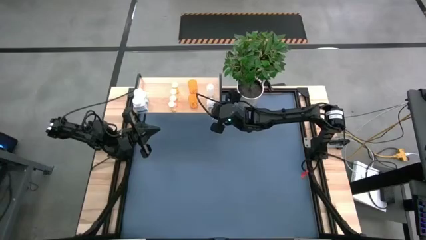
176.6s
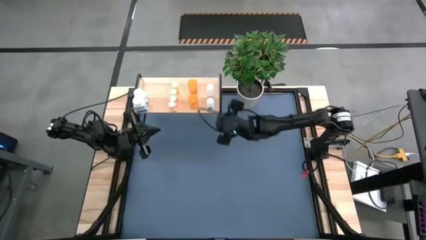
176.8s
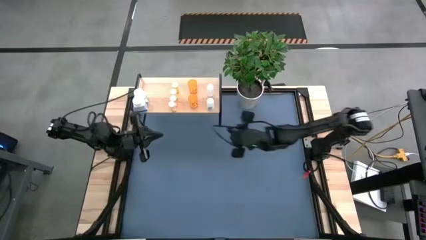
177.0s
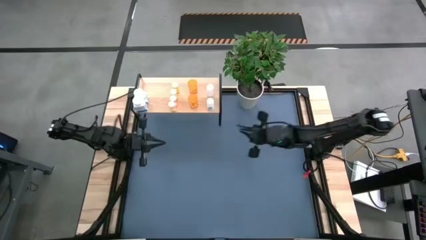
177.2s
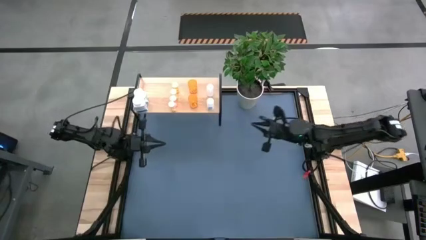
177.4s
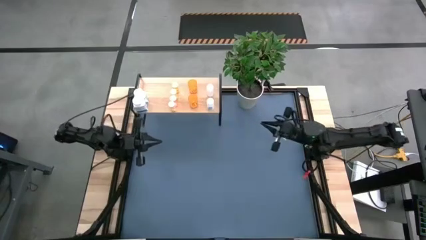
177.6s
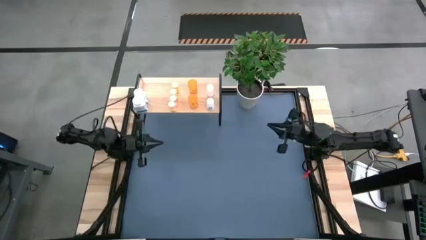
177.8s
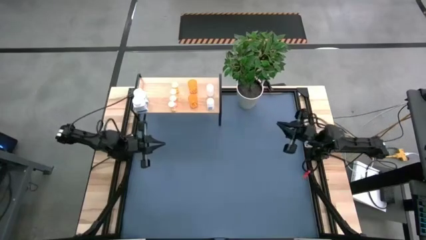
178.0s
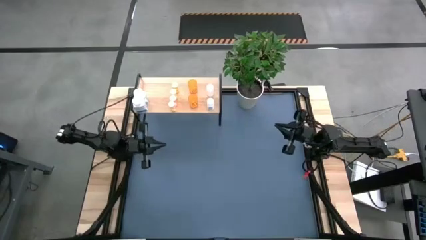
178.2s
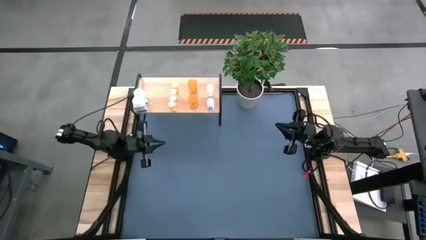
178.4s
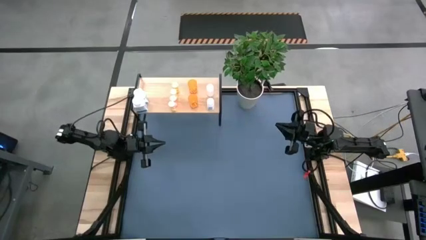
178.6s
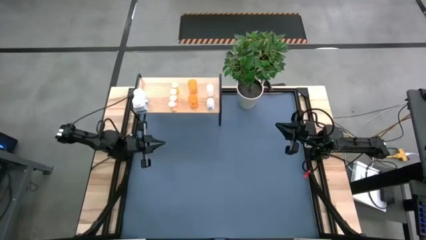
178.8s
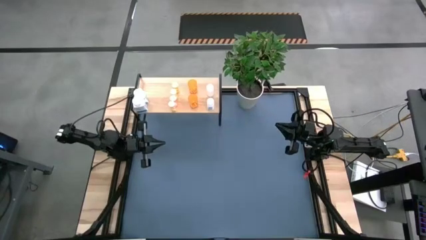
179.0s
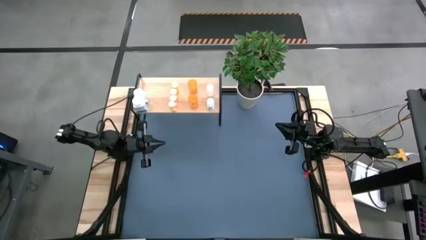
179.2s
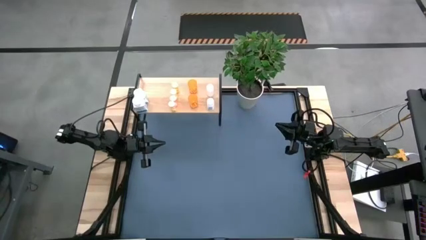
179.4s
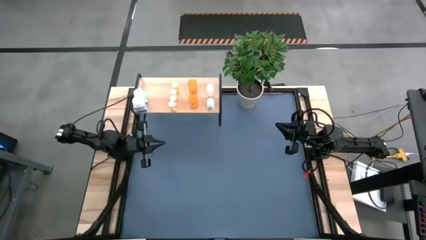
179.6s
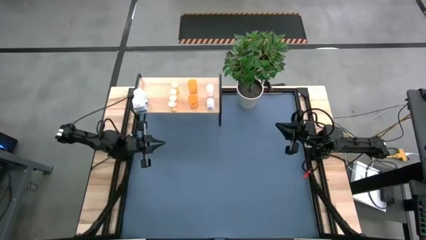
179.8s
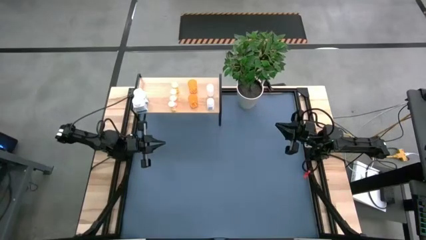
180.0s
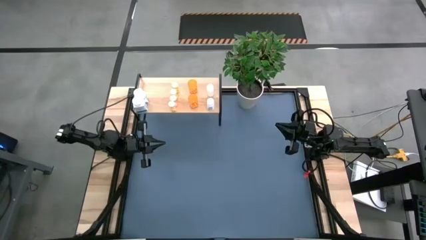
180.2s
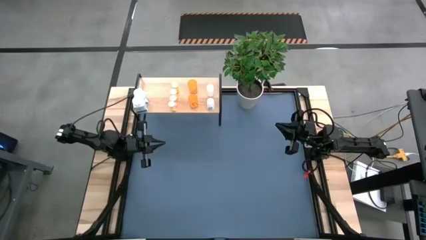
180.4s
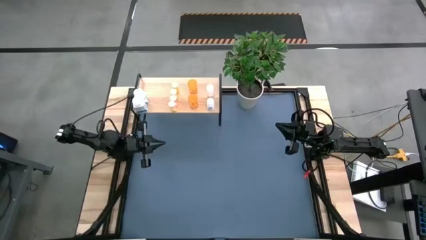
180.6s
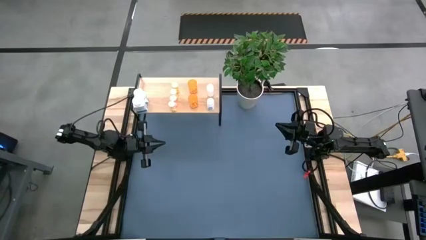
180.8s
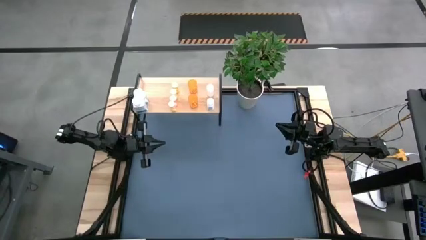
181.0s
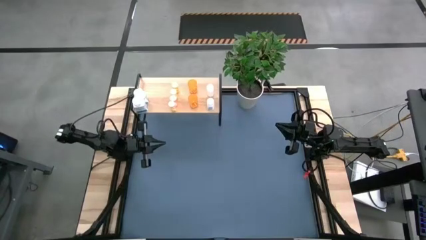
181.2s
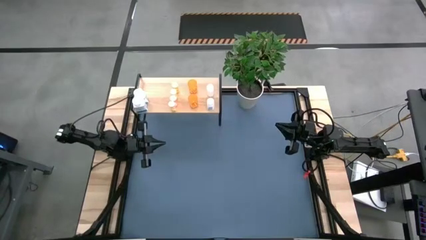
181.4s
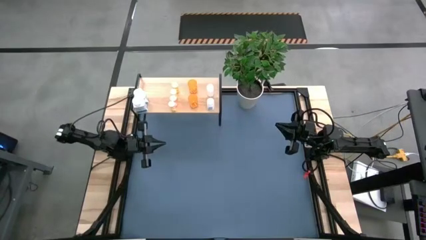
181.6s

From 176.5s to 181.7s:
Task: Pick and place medicine bottles onto shelf by color
Return to Home Position

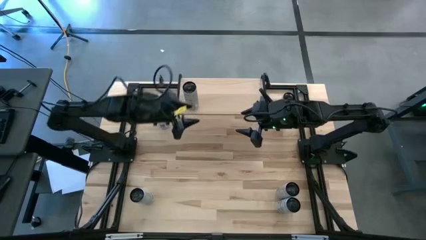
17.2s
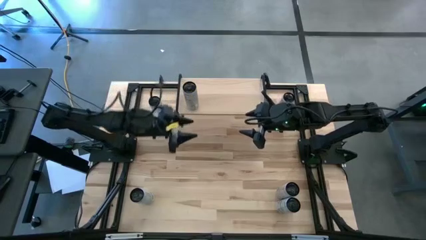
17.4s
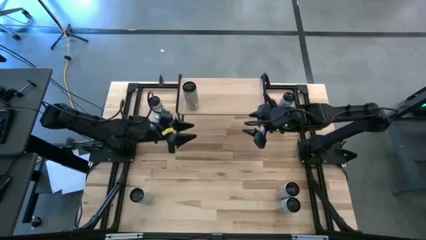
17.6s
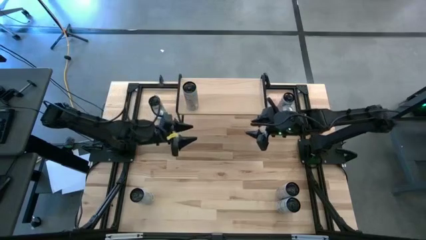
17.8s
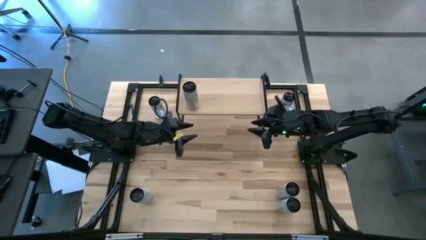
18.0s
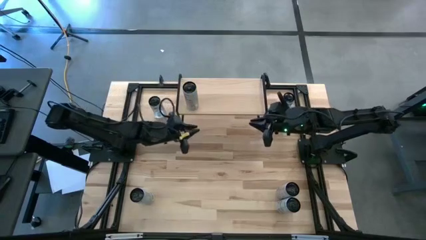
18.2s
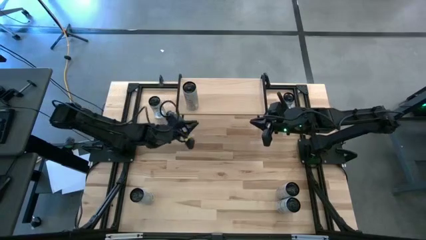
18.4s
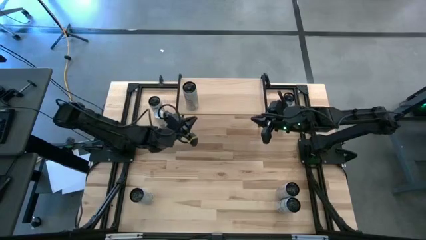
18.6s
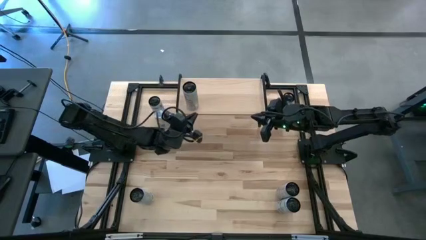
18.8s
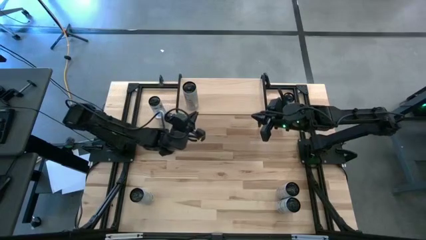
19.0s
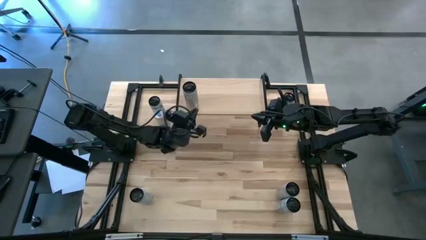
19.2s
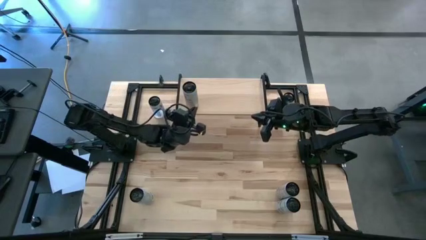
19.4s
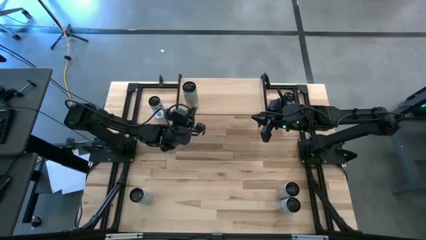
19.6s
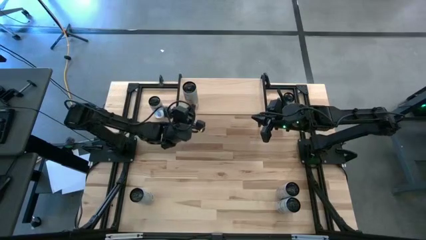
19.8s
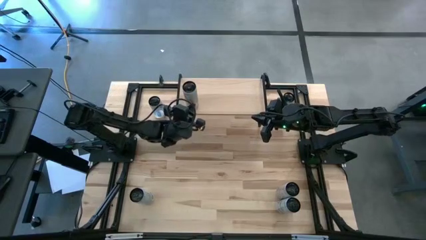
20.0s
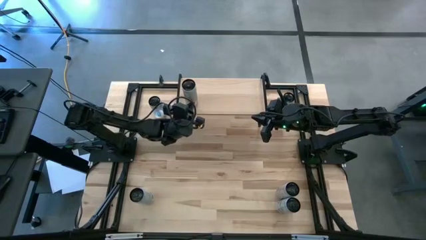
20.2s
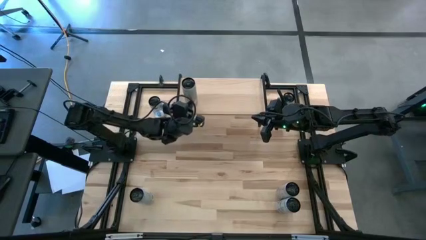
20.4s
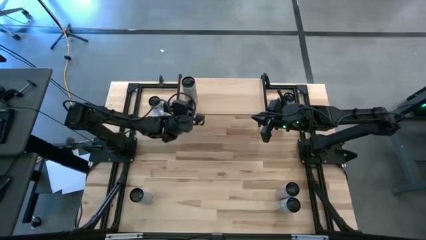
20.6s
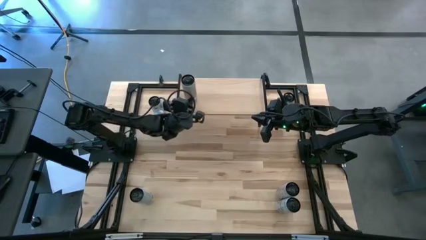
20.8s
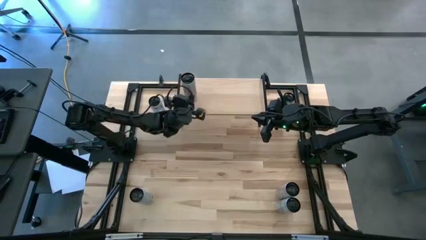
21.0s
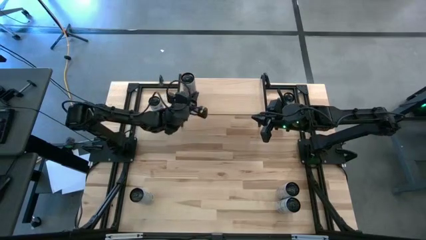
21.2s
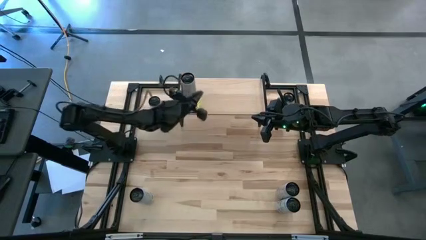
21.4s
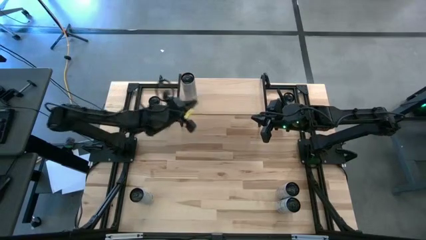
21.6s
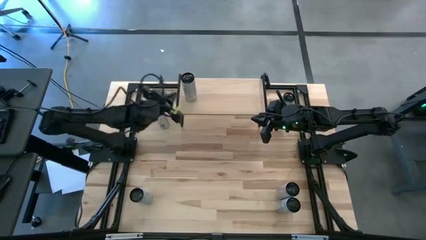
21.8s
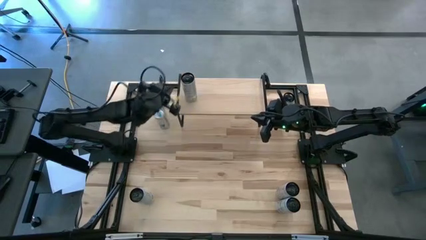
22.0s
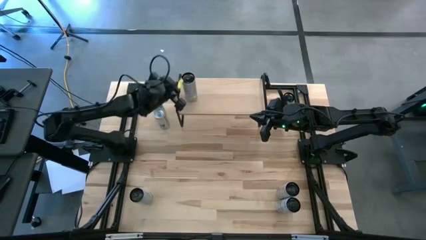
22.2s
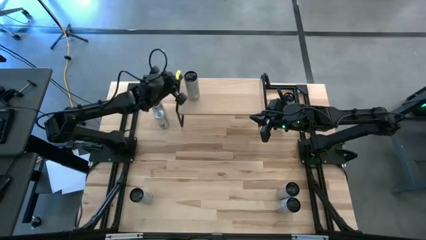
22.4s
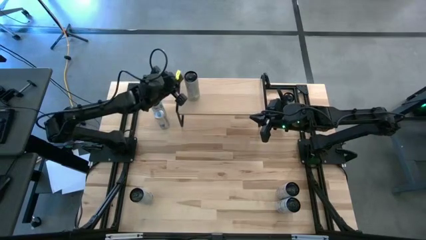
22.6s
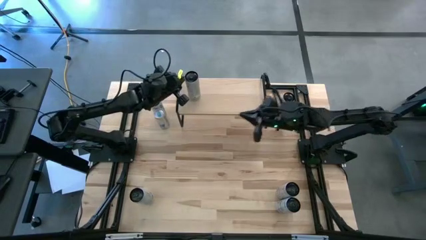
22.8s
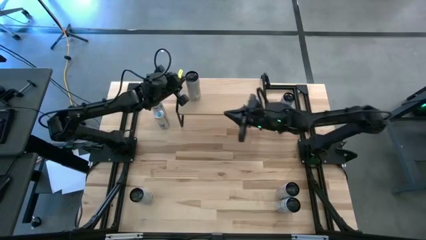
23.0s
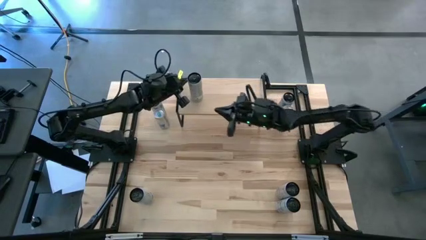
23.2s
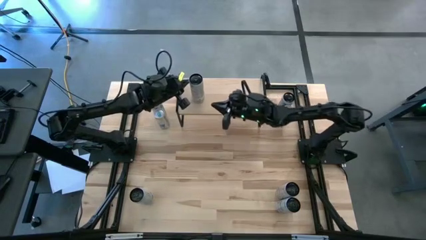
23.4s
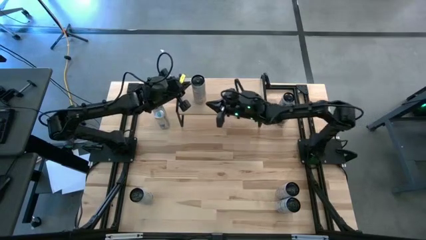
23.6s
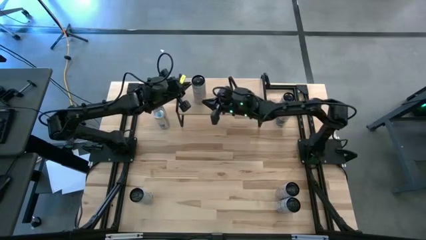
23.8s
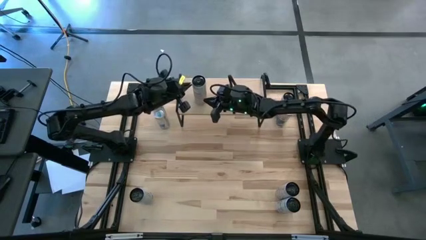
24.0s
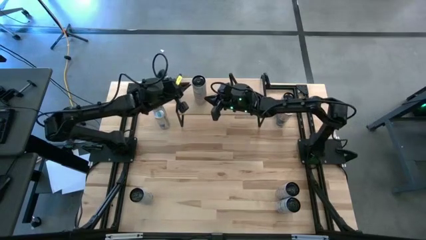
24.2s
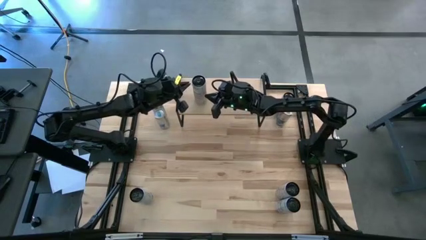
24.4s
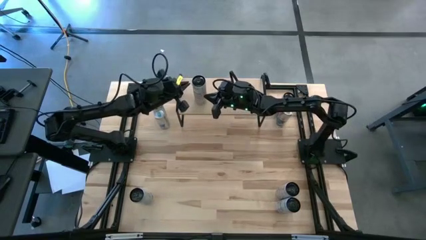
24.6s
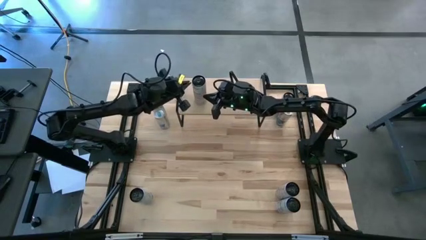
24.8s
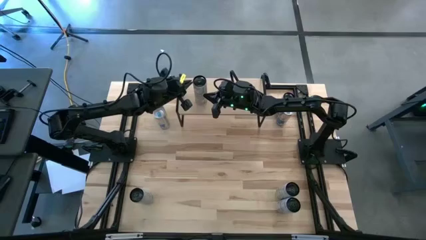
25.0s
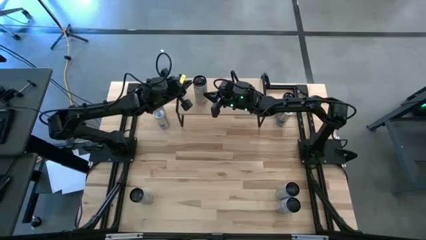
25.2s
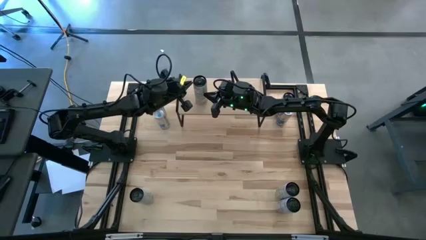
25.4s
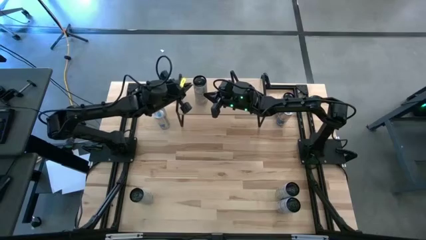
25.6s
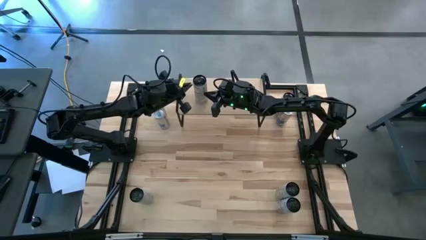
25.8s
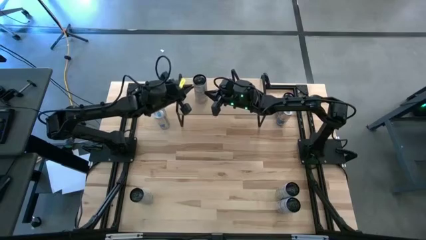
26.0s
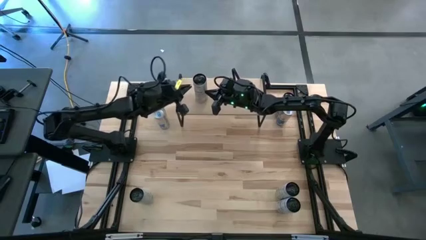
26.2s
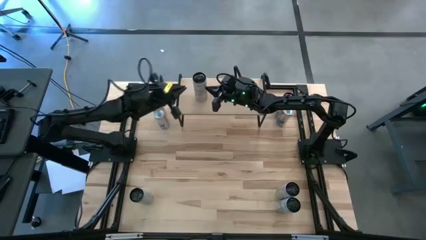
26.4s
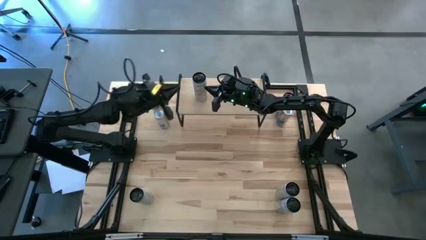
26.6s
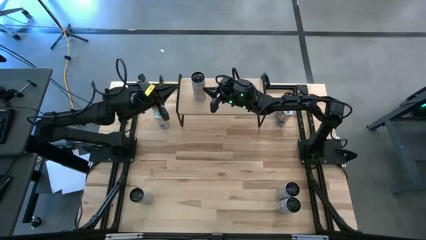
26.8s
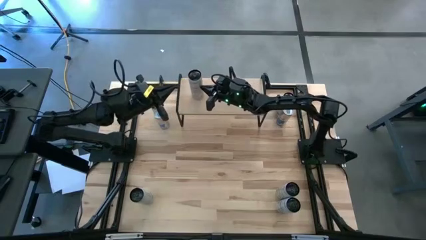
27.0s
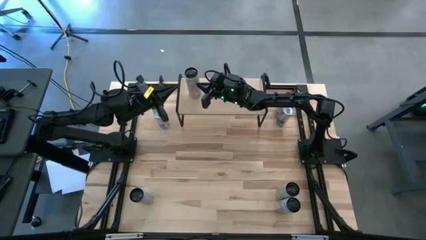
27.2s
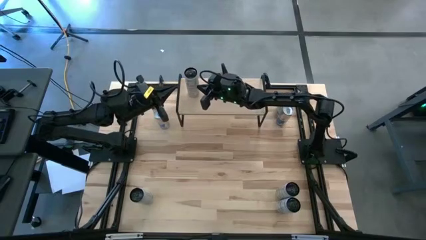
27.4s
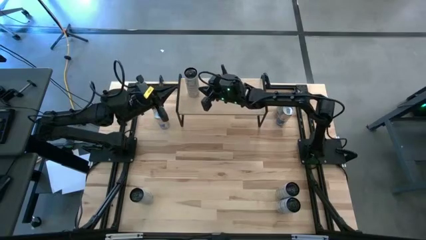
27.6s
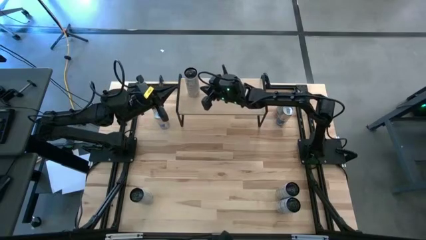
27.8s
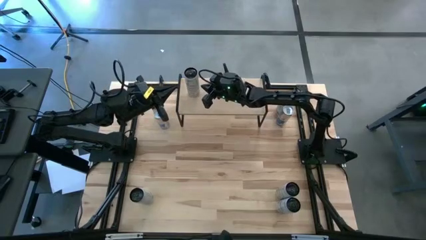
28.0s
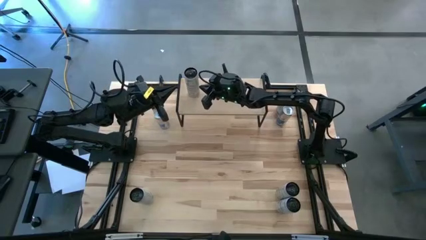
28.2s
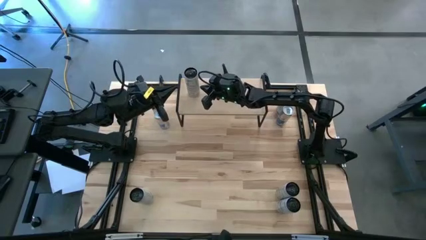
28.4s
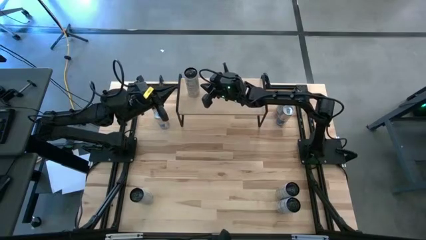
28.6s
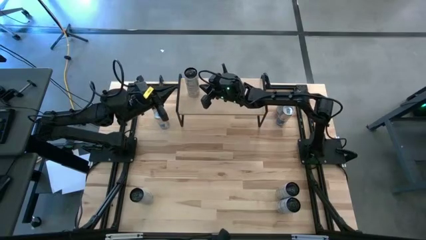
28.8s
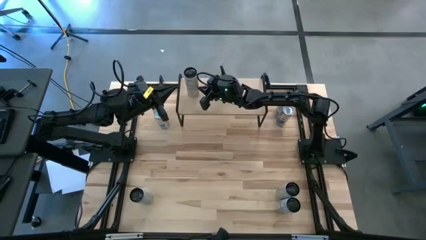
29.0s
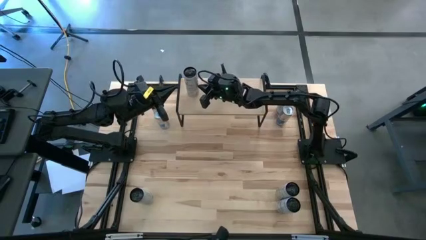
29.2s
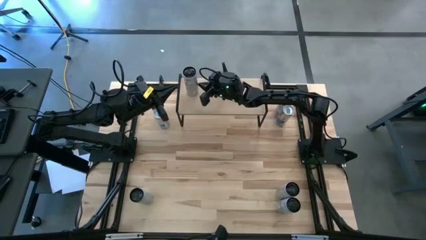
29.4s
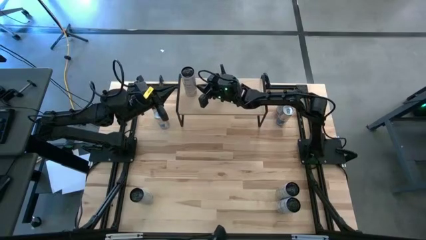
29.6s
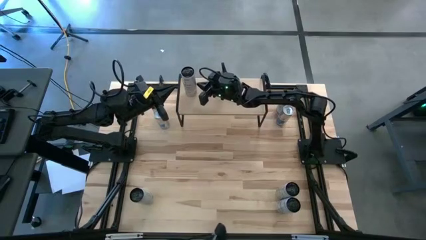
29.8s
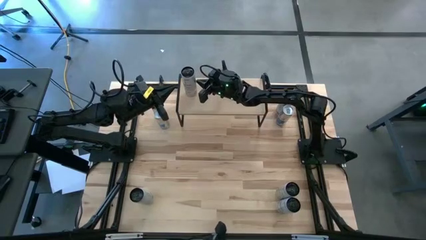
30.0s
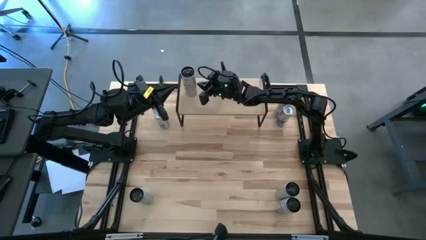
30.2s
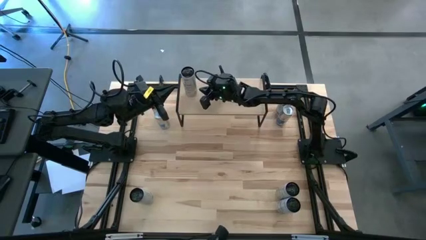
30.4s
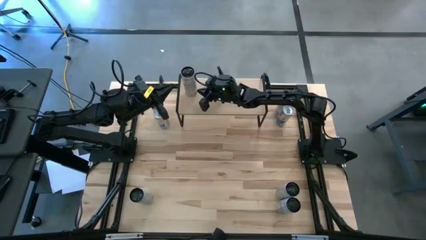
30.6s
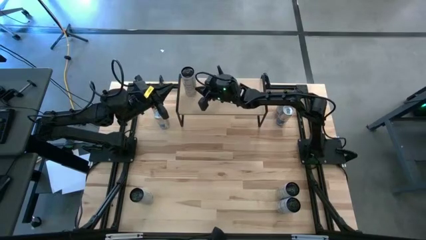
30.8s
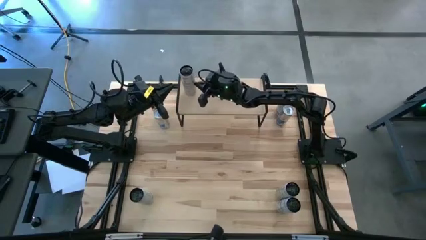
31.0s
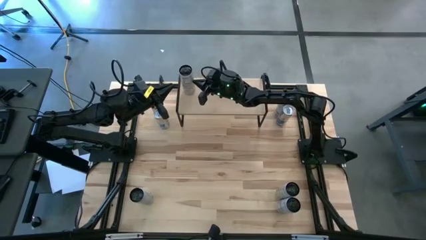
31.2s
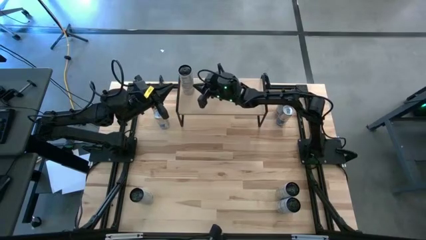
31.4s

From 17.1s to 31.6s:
Task: Place canned beverage on shelf
Put the bottom left black soda can on the shelf
